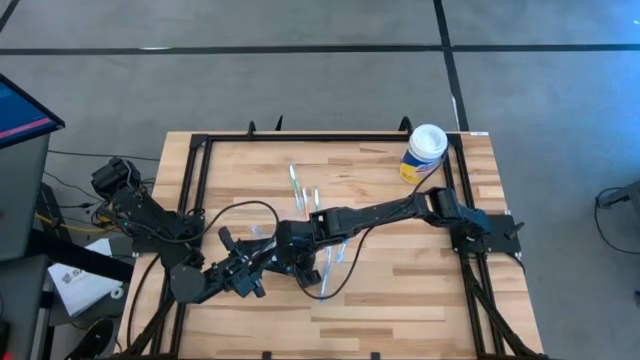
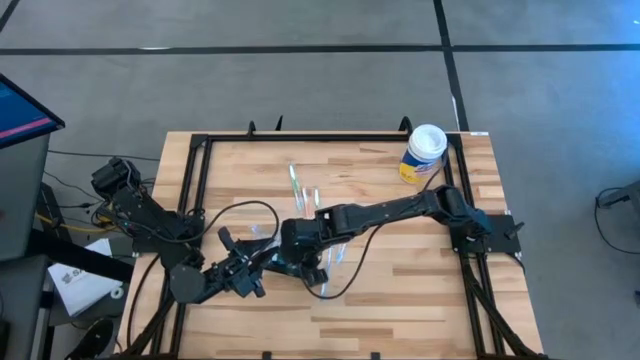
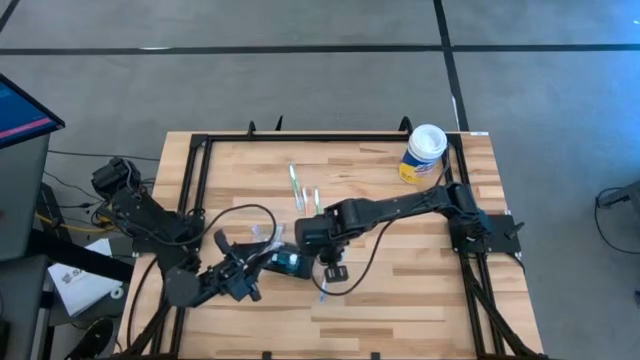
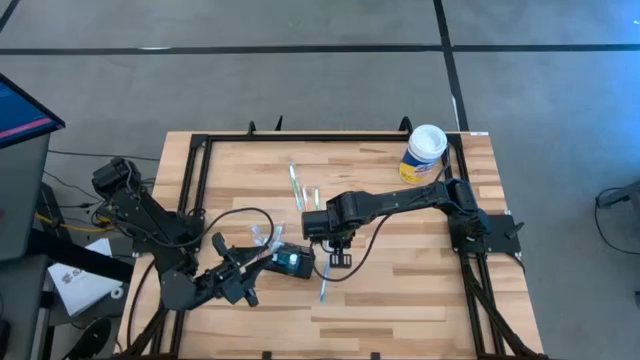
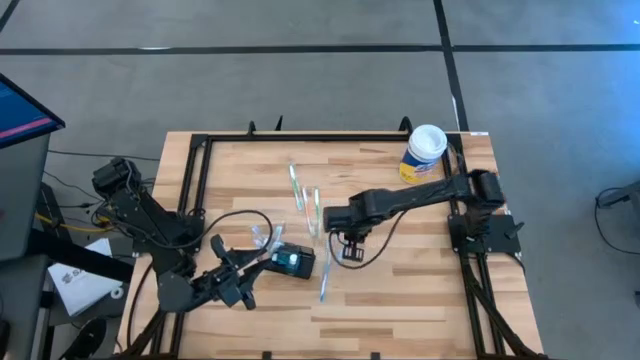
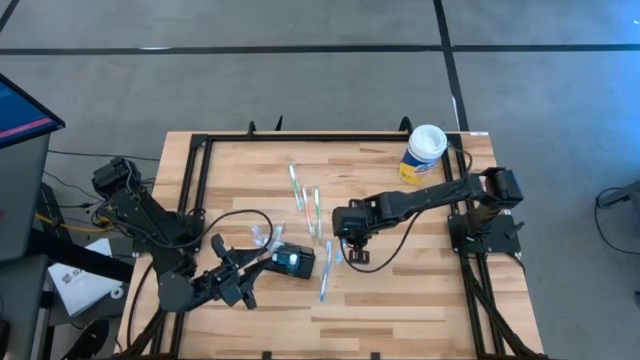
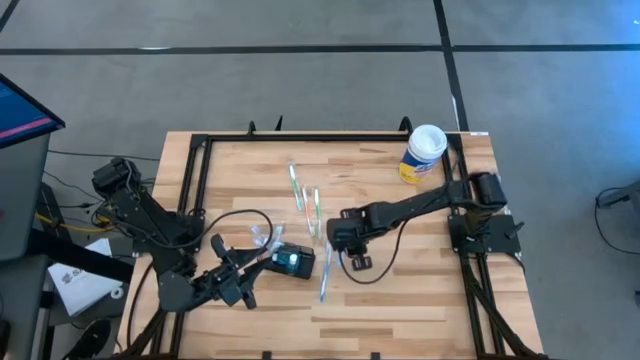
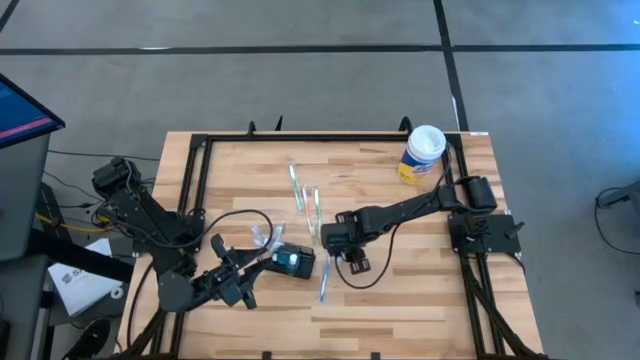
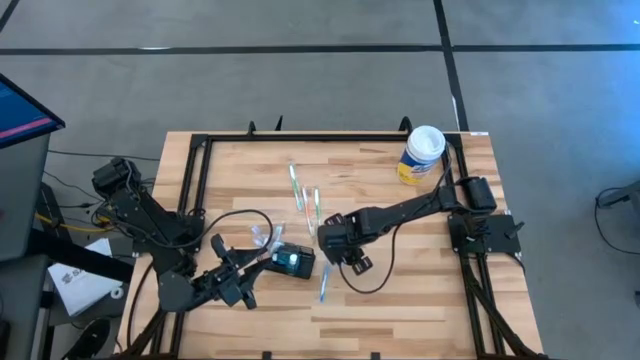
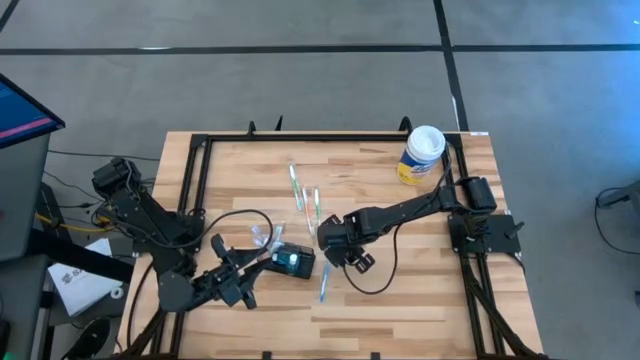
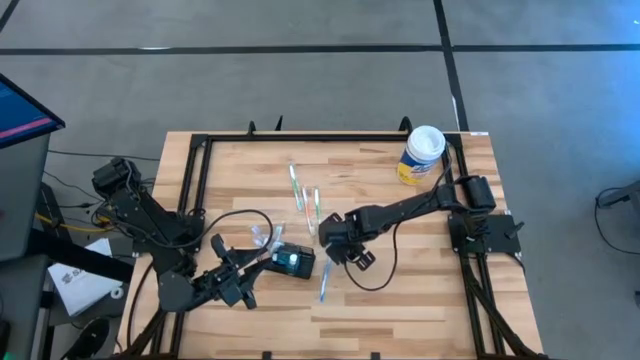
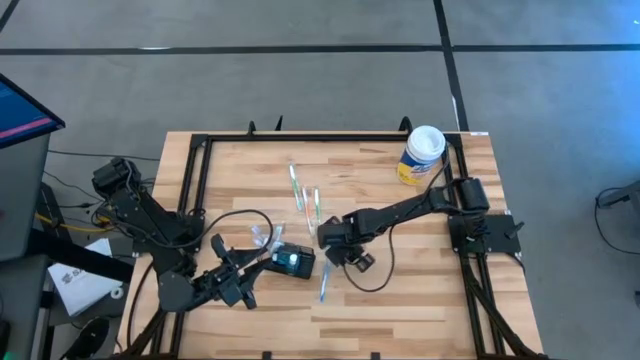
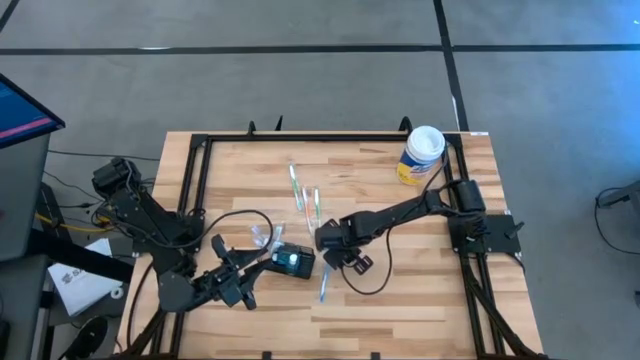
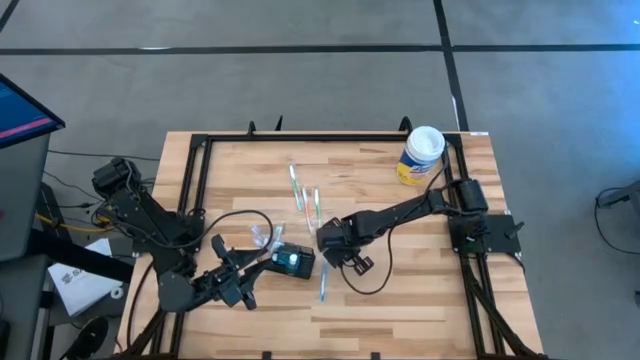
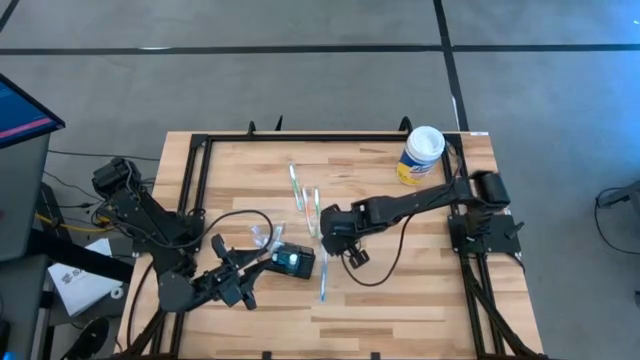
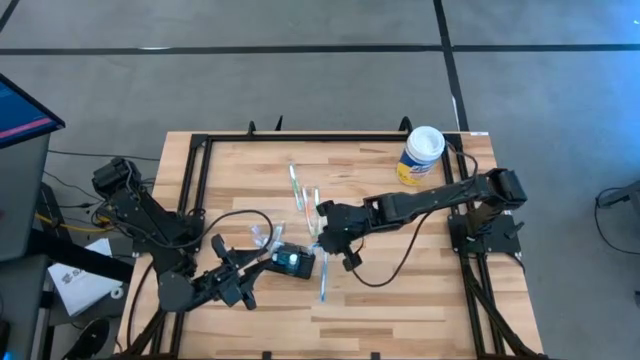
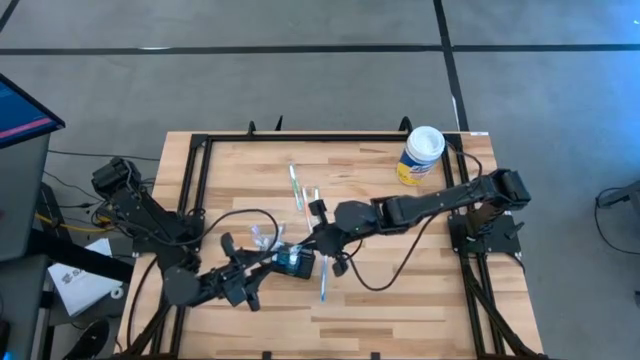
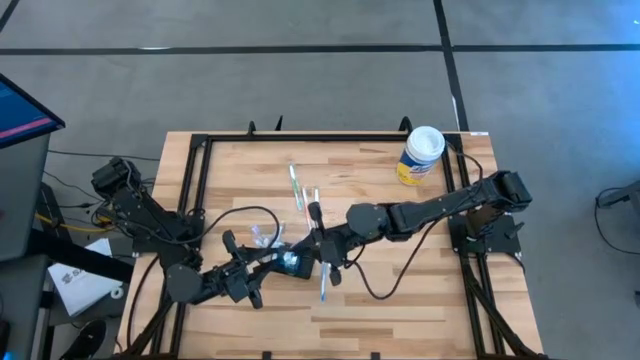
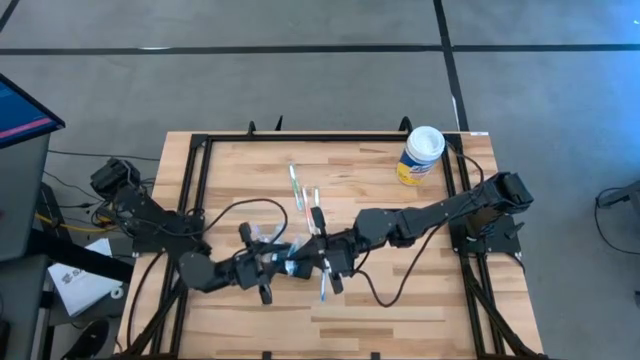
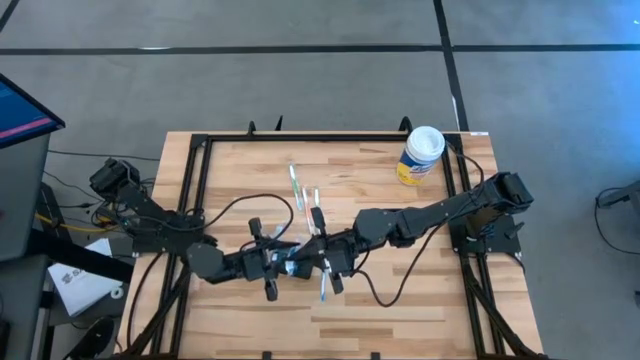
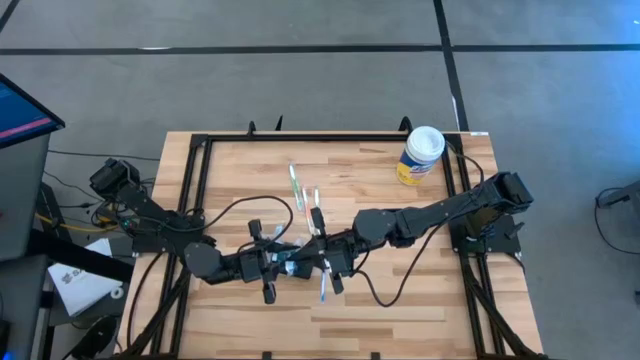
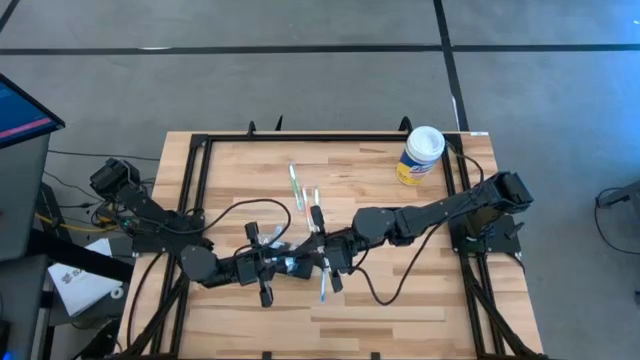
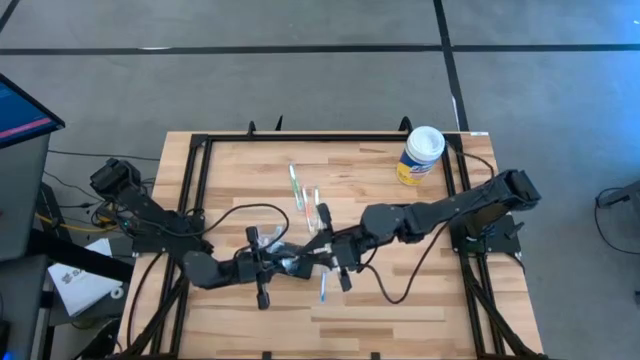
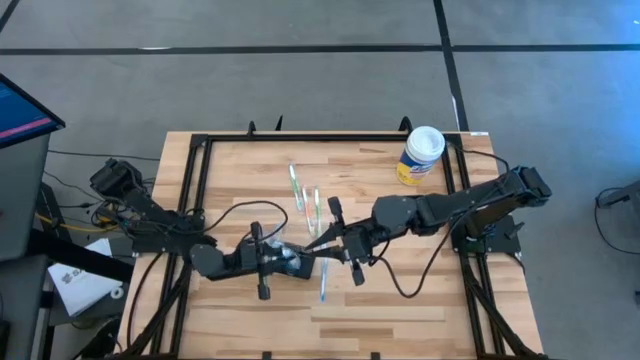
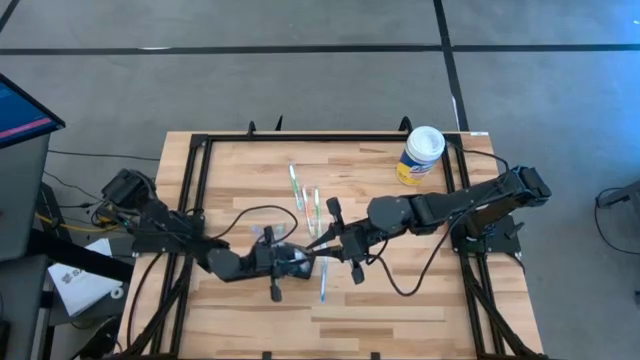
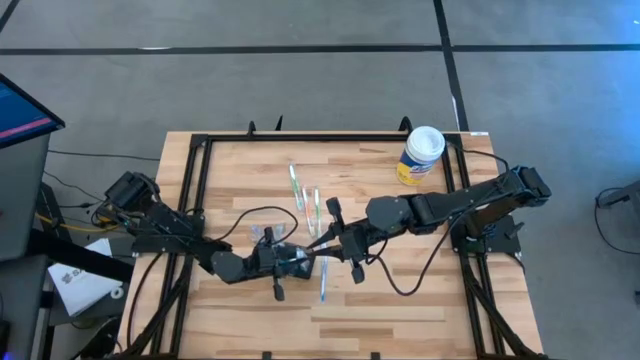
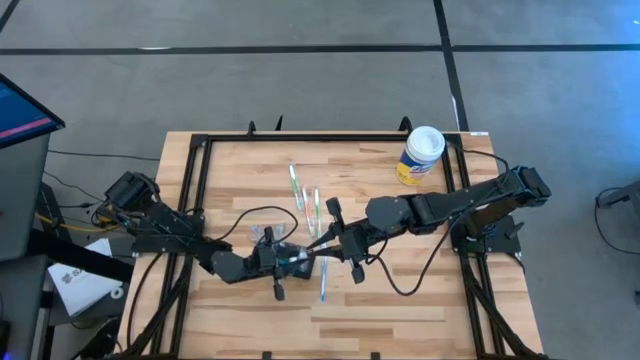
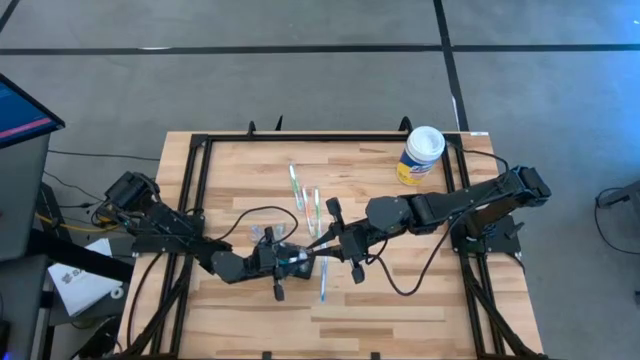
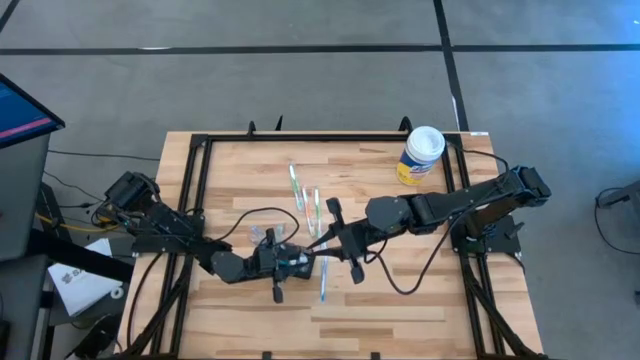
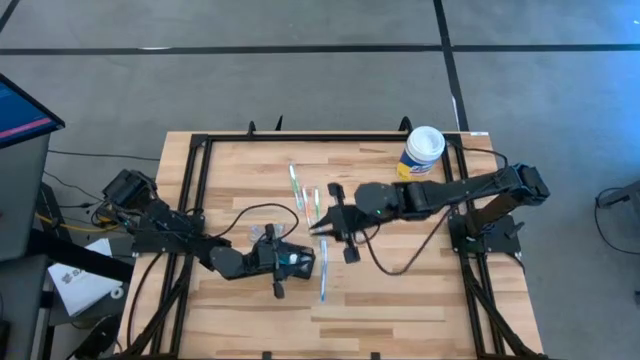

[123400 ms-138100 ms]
Task: Pick & Place toothbrushing station
Put the right blue toothbrush into the wire organizer

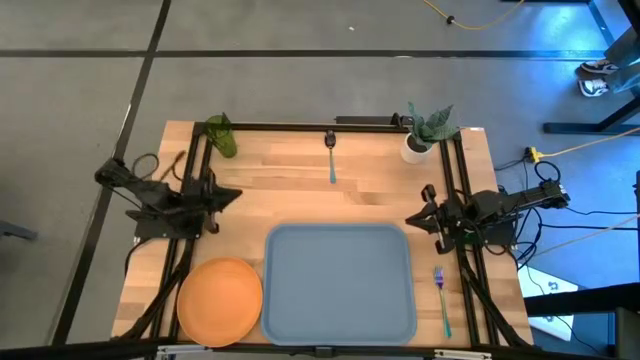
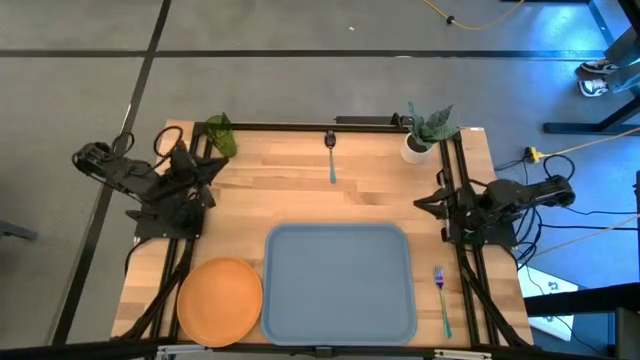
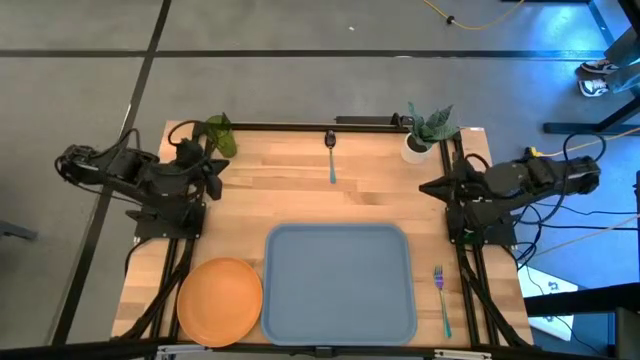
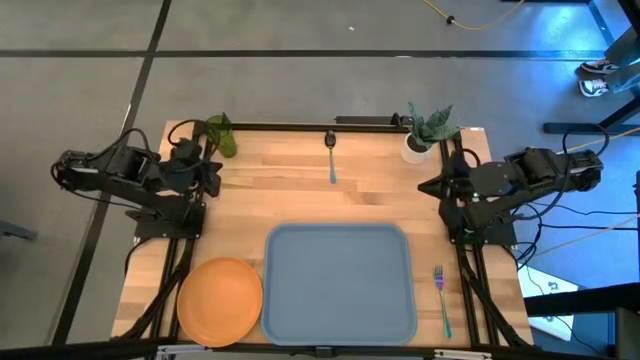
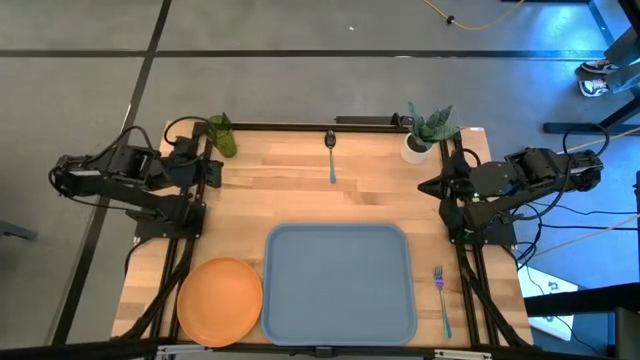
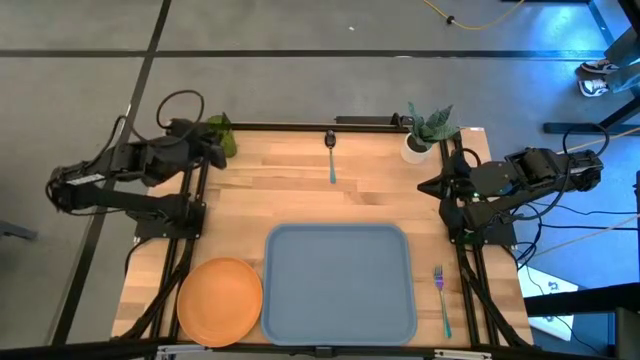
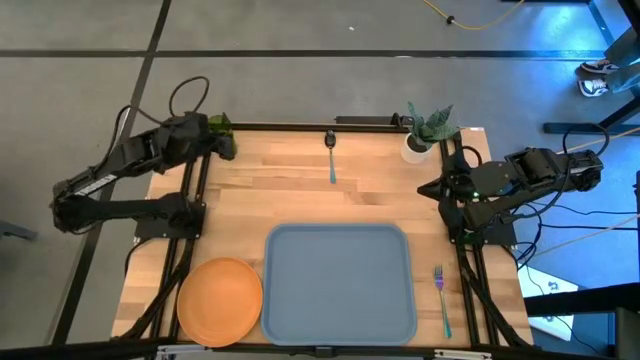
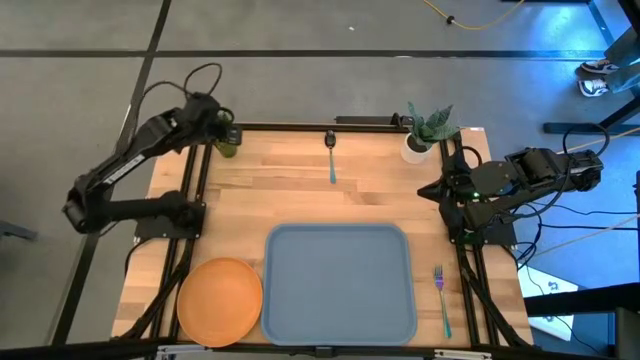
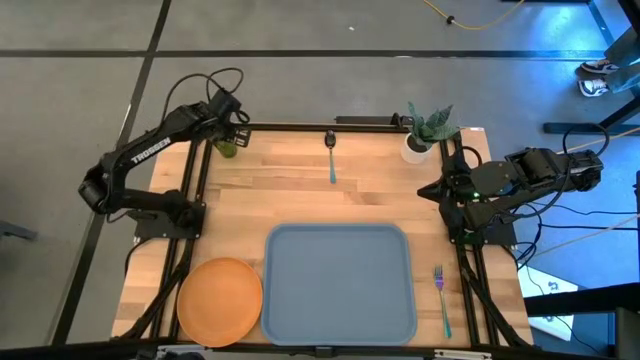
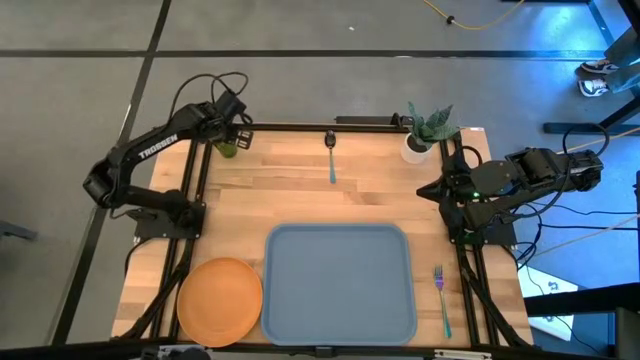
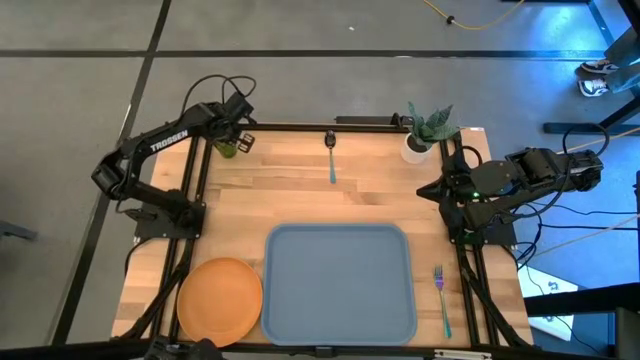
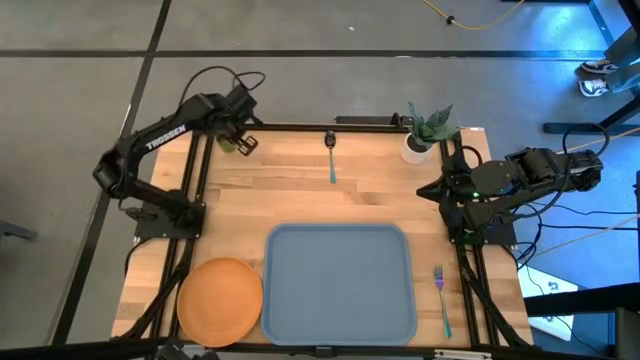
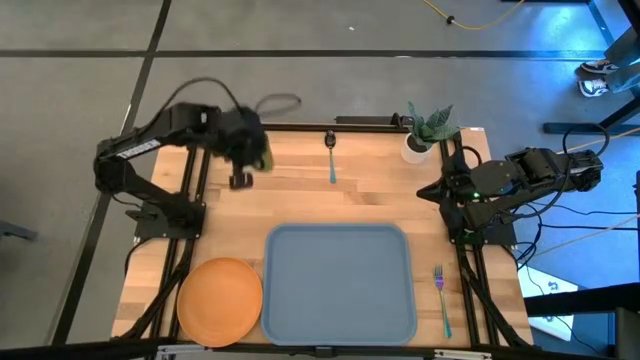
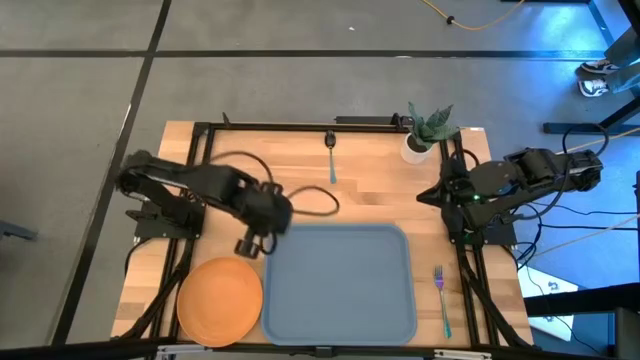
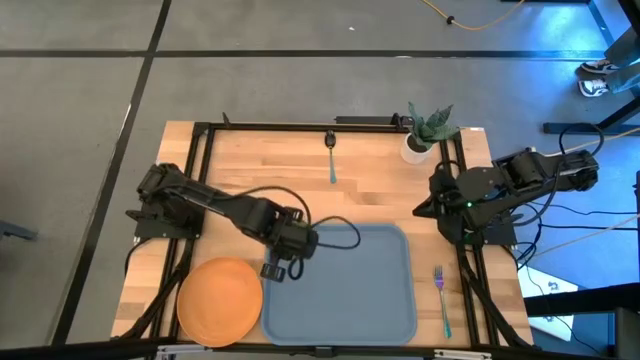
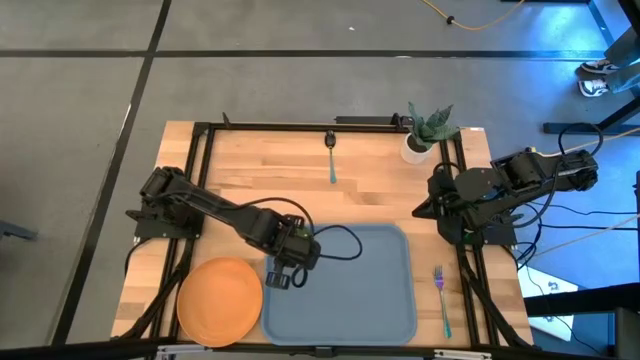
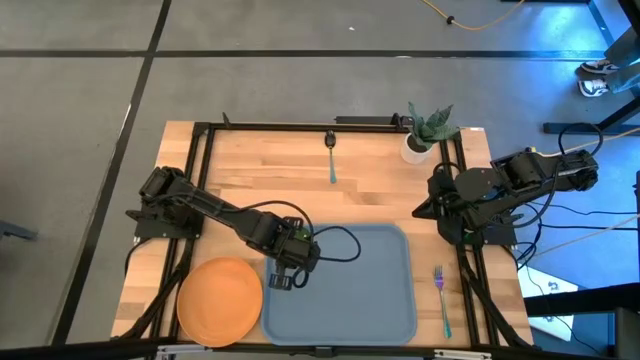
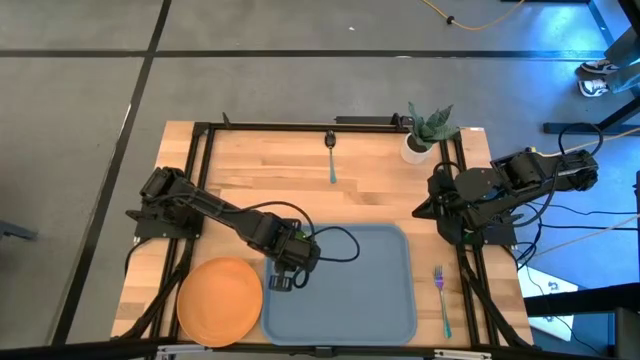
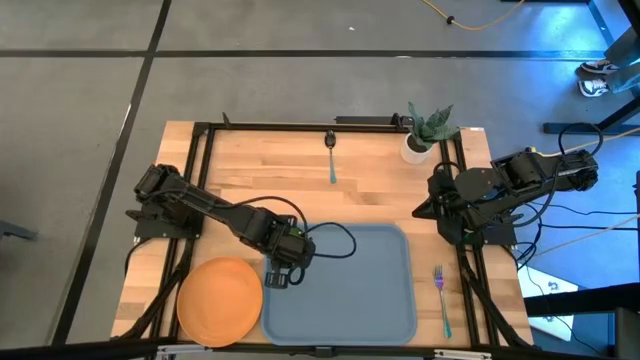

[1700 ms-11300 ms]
Task: Pick and place plate/cup/fork/spoon on tray
Put the green cup on the top left of the gray serving tray
